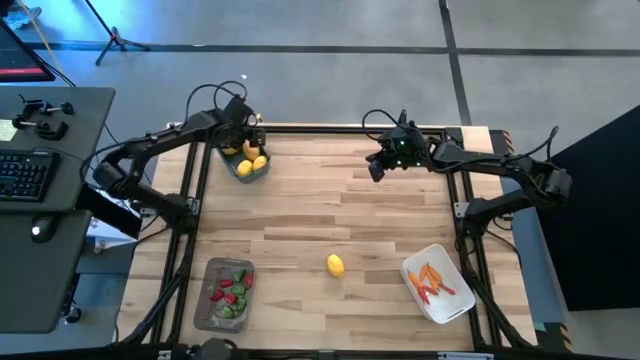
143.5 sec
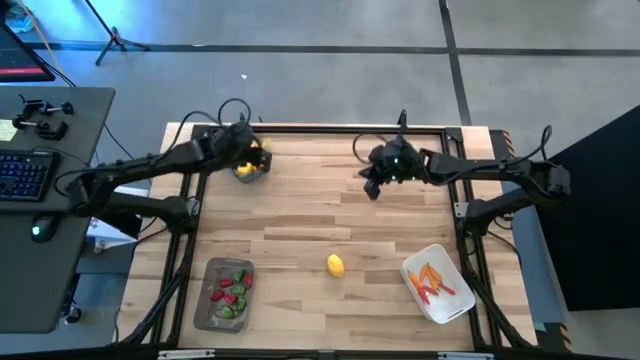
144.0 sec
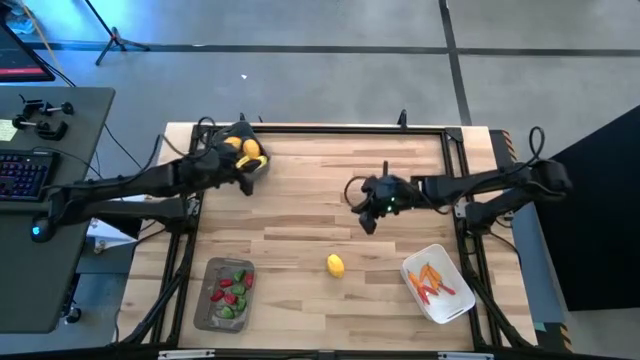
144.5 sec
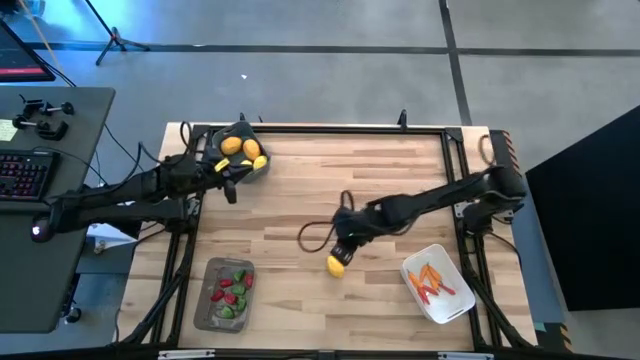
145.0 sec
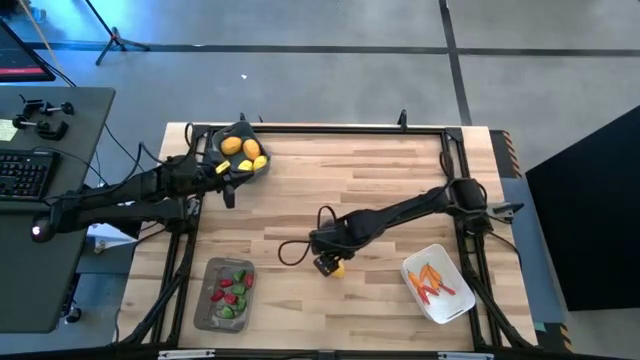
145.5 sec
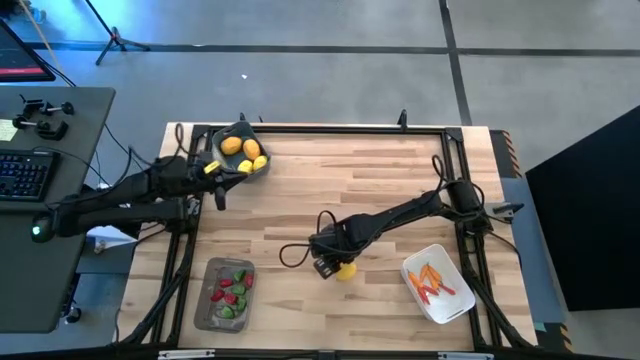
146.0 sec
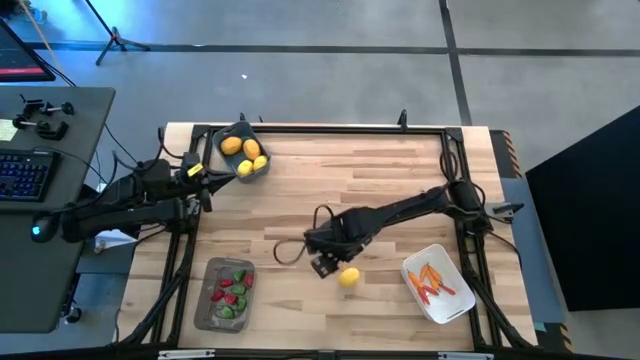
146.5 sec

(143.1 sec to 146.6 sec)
Task: Sort produce into baskets
Put the lemon into the blue bin

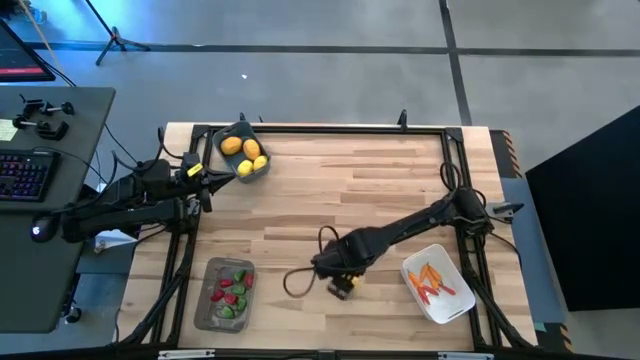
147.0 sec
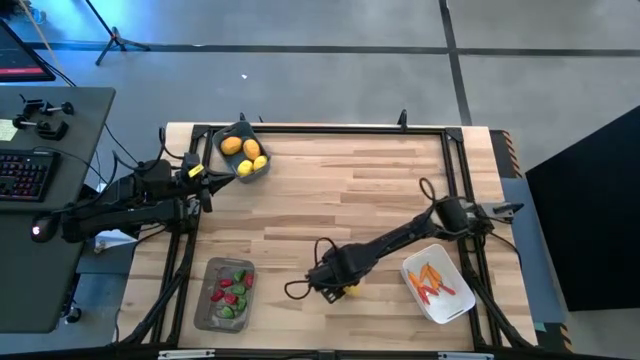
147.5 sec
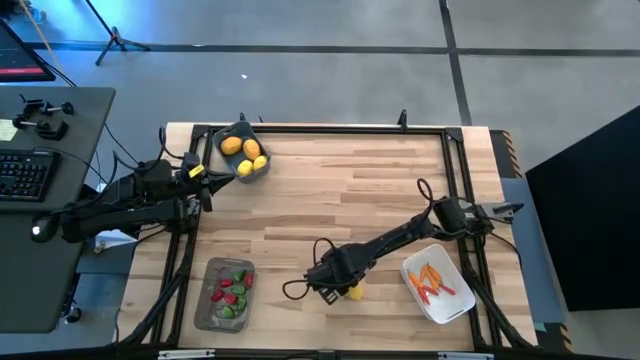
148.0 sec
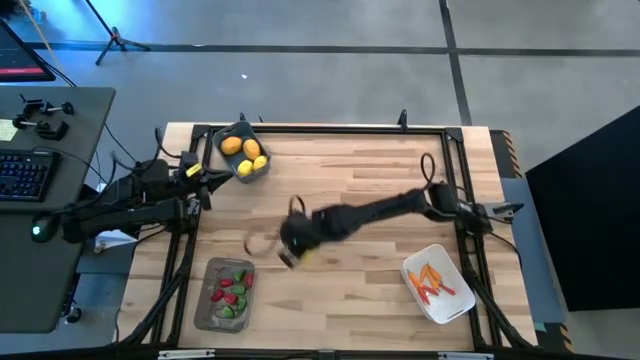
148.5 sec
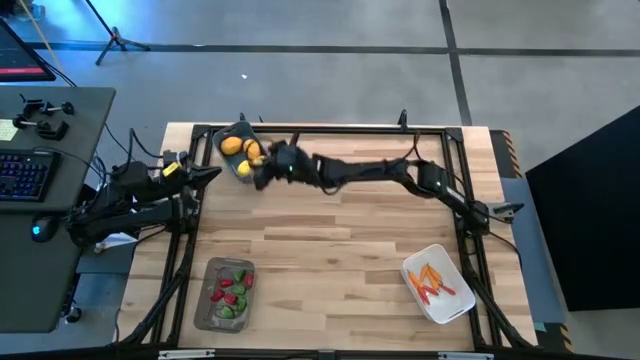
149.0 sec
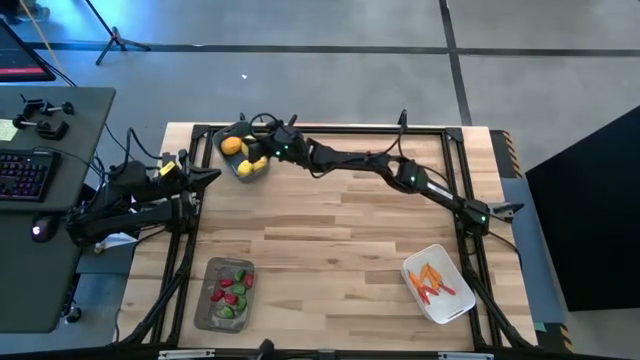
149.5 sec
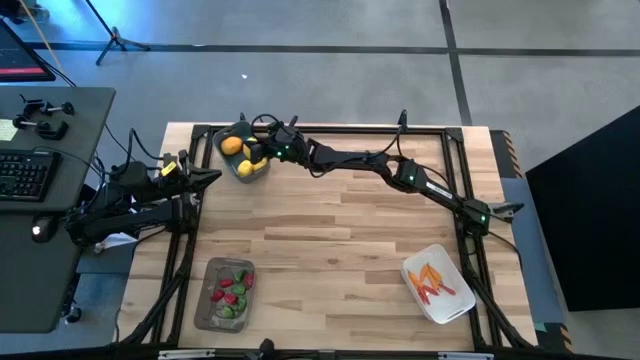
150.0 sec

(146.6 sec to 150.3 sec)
Put the lemon into the blue bin

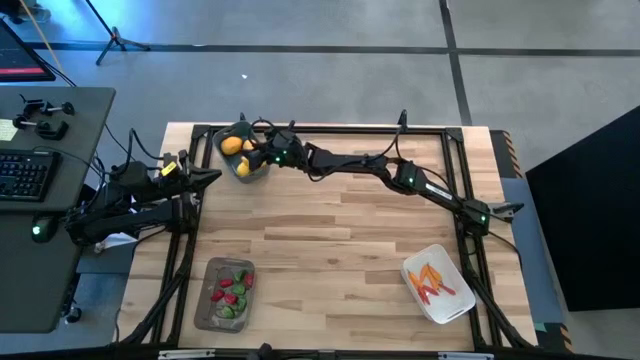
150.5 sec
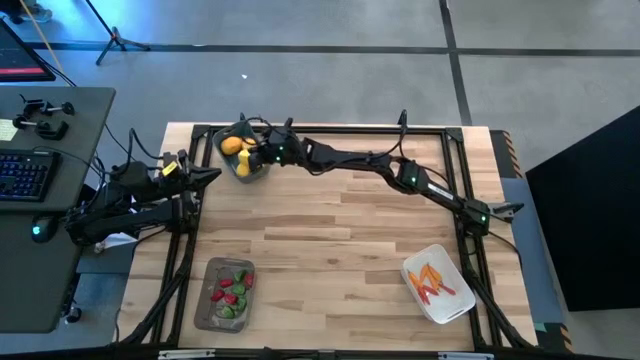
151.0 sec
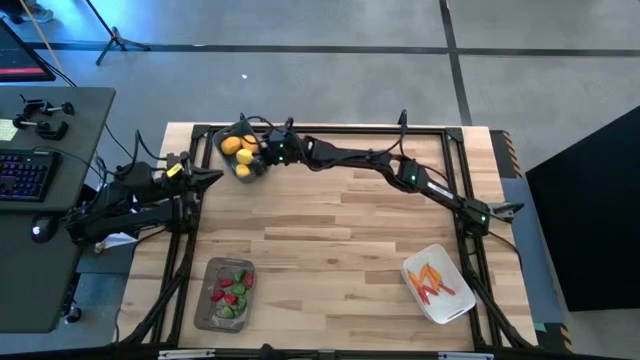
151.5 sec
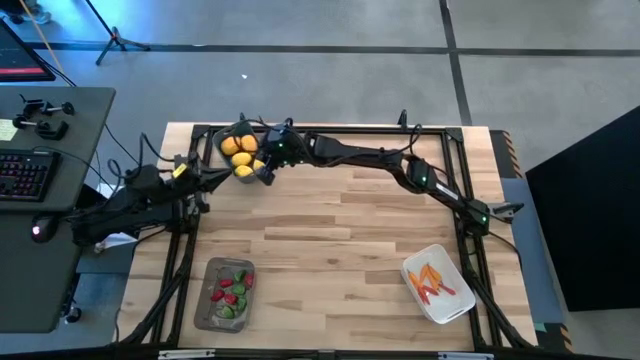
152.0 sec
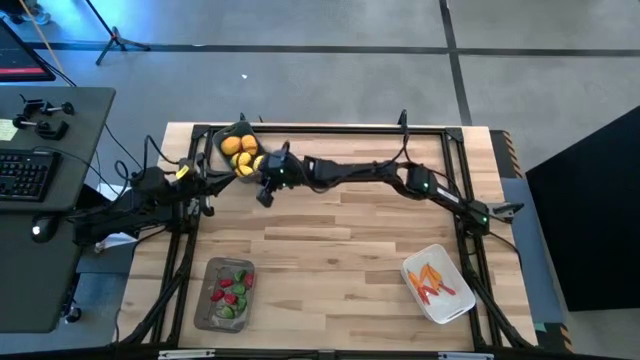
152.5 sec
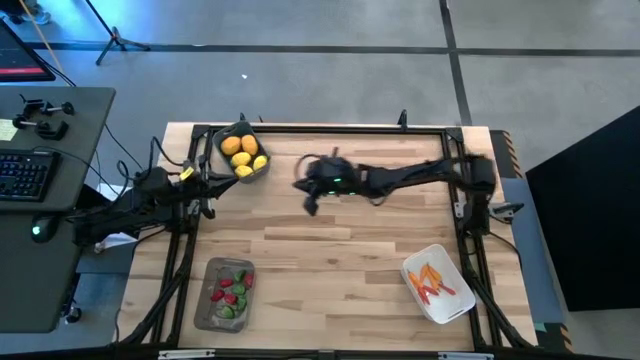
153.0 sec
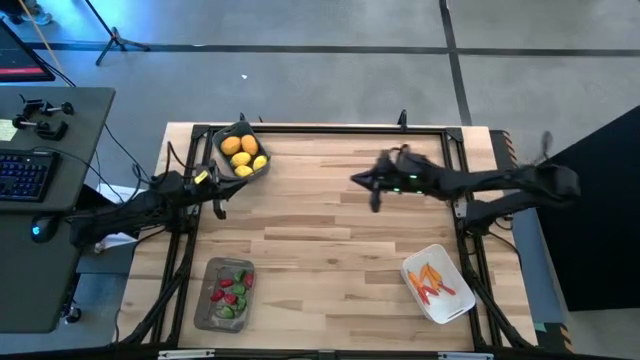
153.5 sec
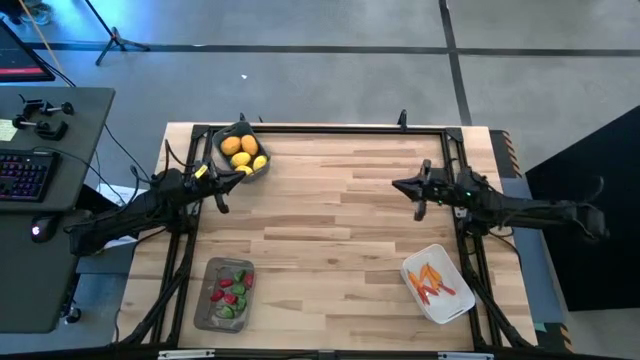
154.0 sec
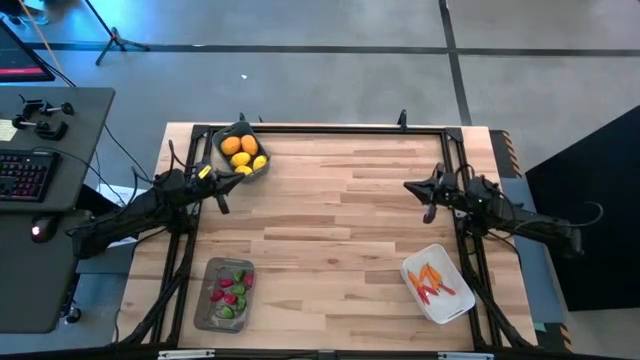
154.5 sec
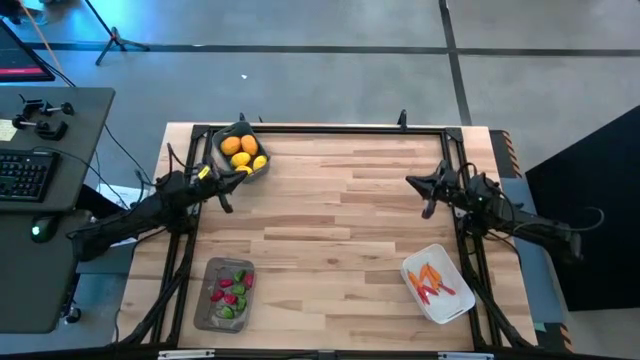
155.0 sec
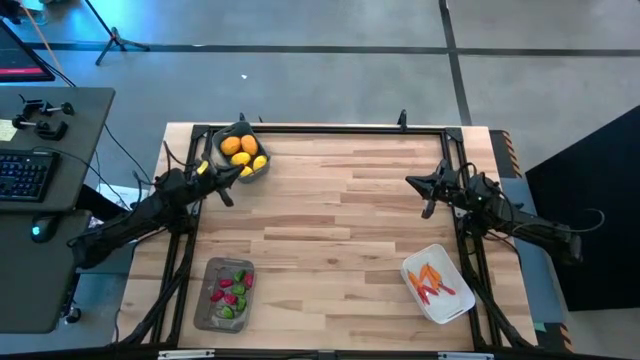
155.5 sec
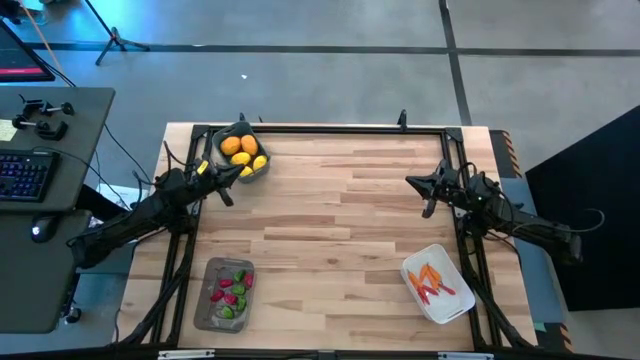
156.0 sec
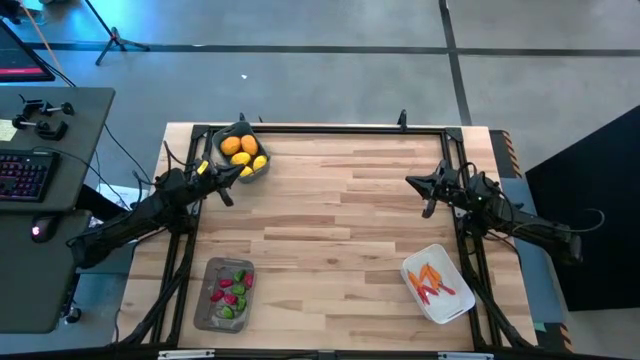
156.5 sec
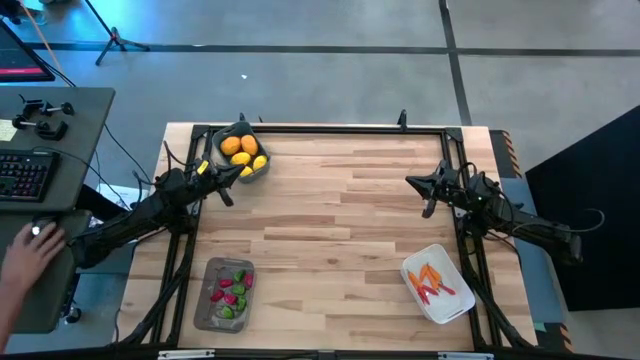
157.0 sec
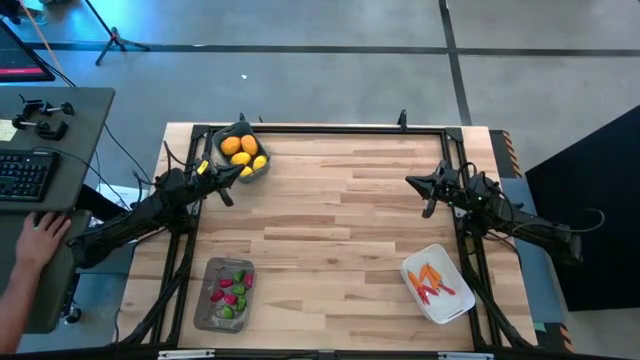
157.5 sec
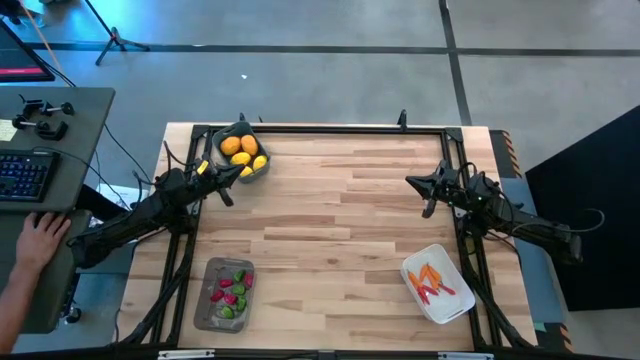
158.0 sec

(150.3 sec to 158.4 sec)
Return to Home Position

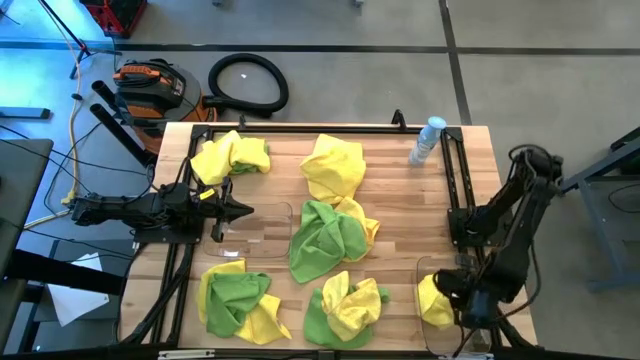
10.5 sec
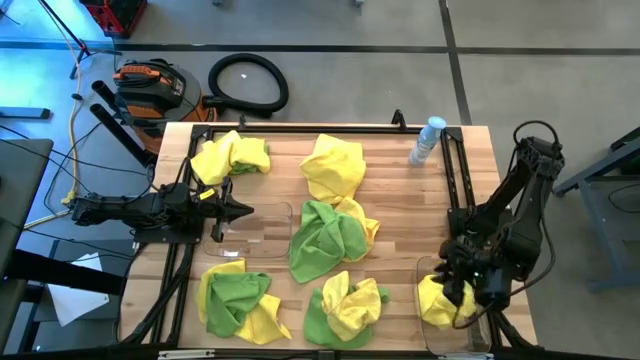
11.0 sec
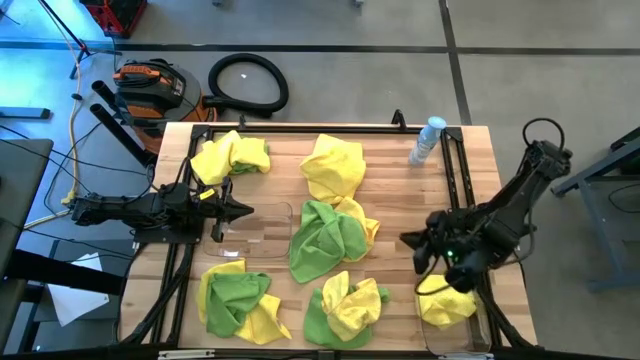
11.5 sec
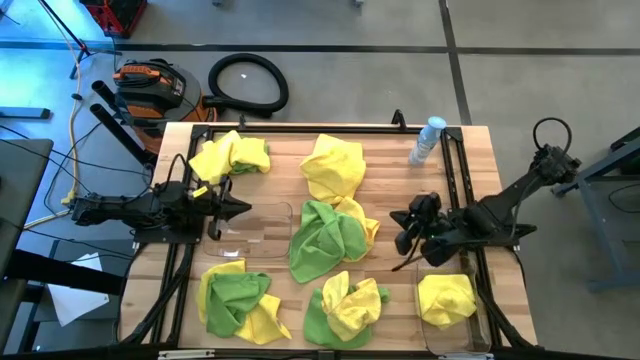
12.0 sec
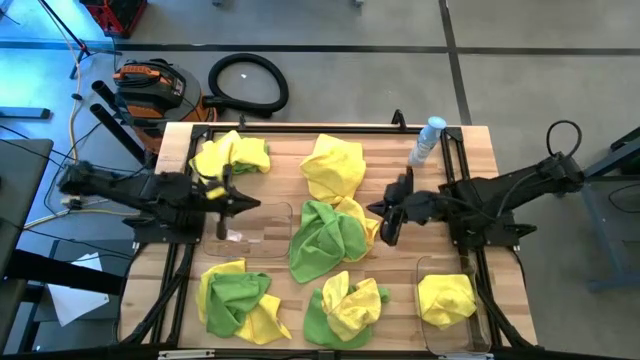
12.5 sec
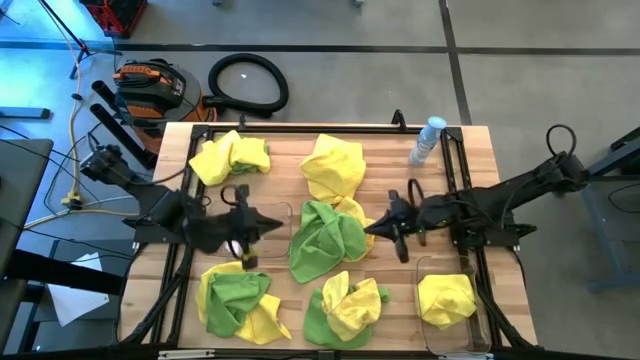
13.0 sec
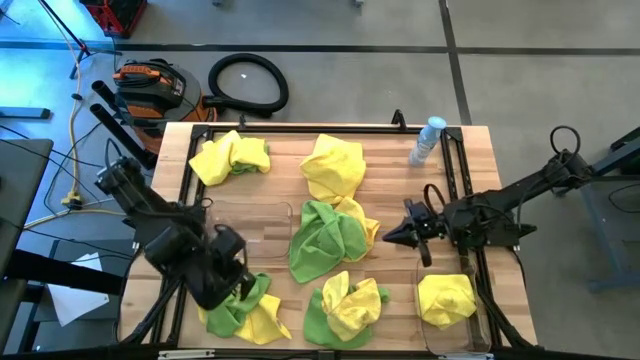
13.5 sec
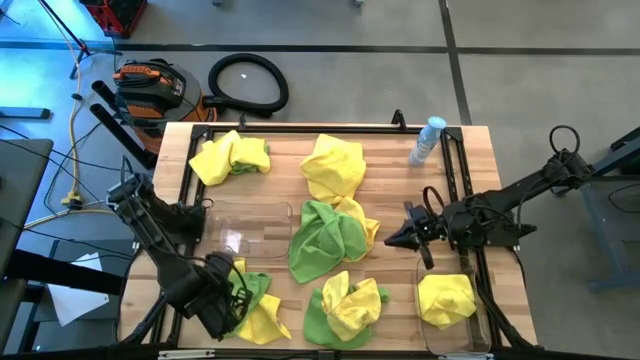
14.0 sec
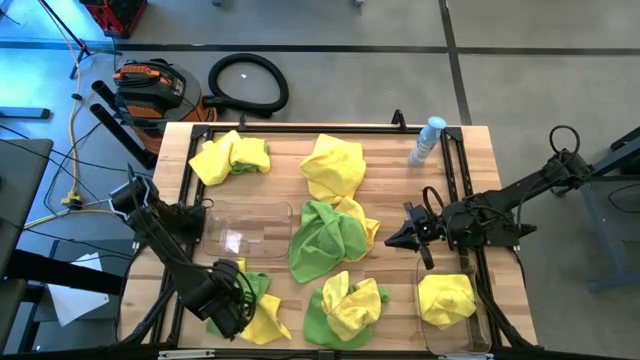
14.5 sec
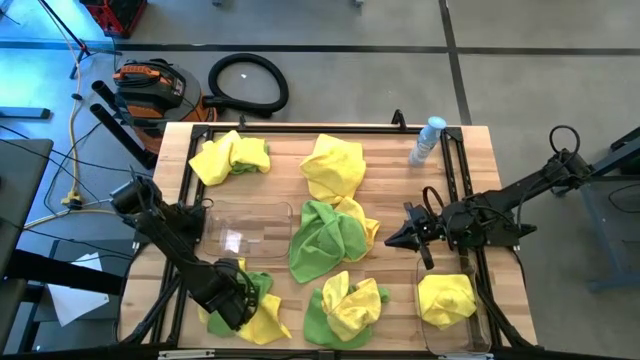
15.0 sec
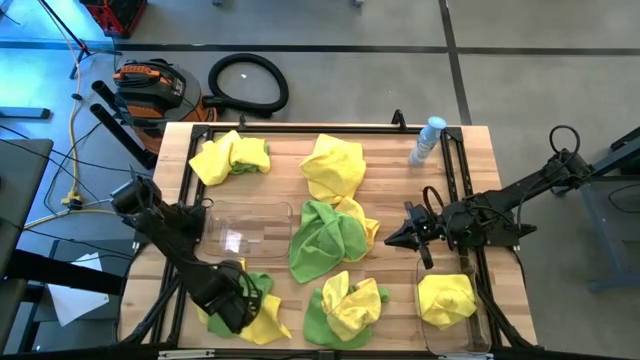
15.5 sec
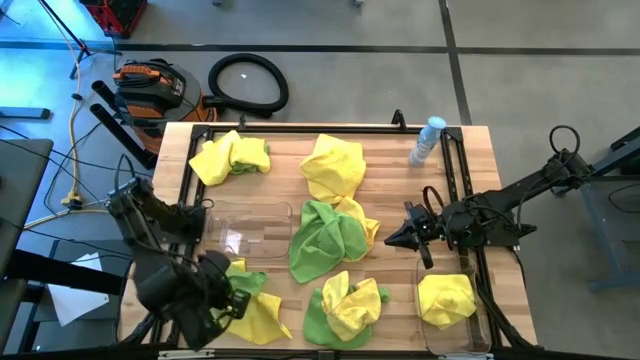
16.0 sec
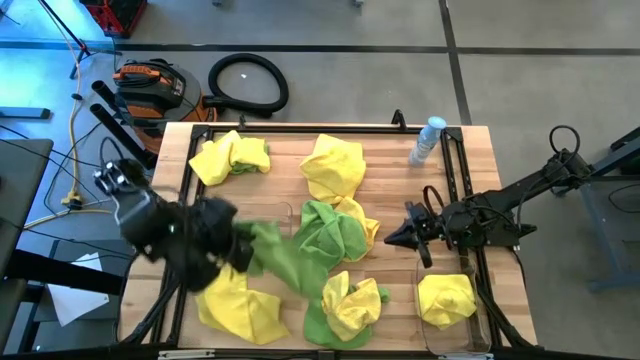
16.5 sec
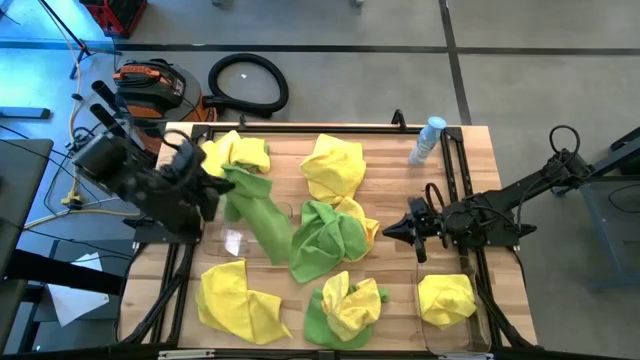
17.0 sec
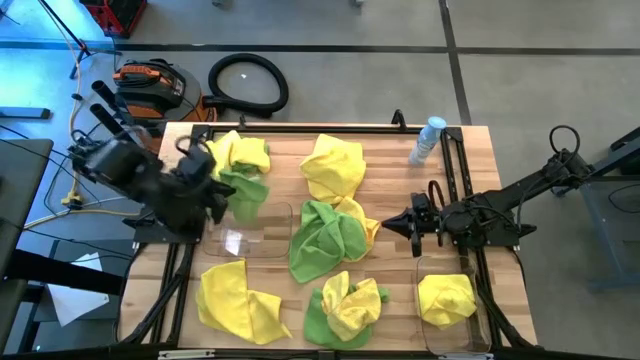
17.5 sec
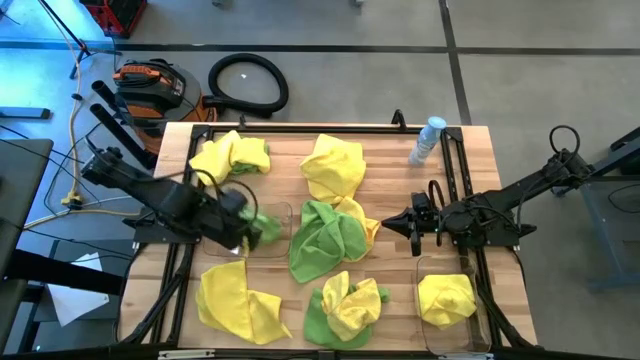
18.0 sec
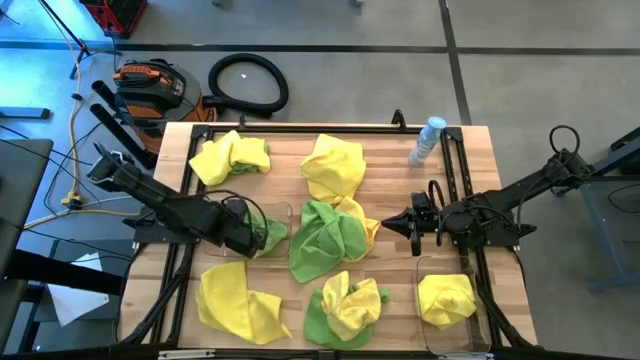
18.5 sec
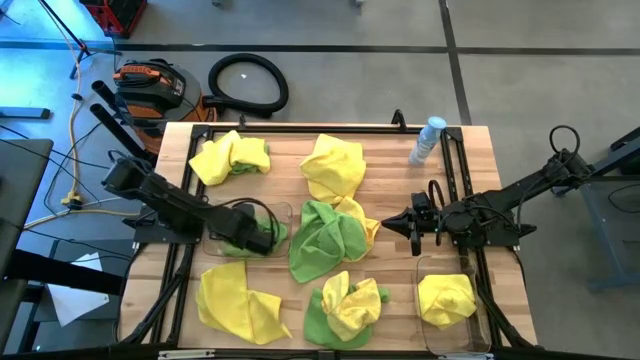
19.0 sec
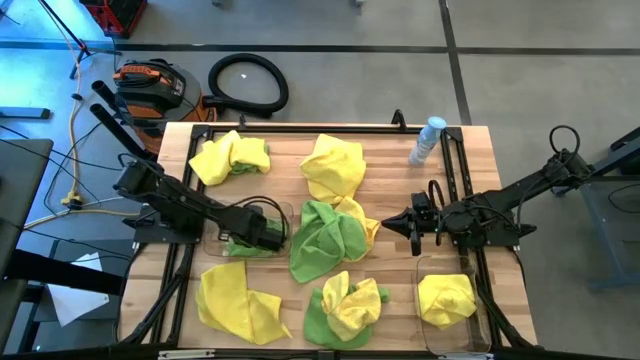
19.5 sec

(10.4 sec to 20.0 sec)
Task: Sort microfiber towel by color & place in baskets
Put the green towel into the left transparent bin
